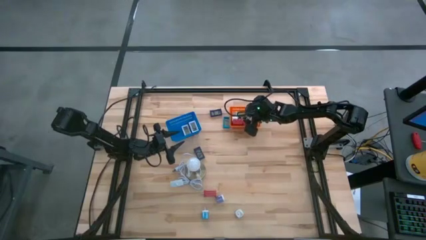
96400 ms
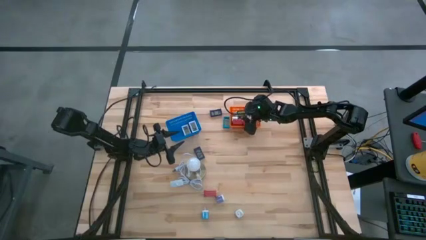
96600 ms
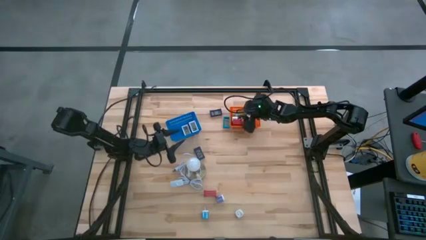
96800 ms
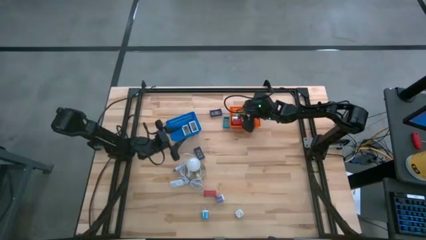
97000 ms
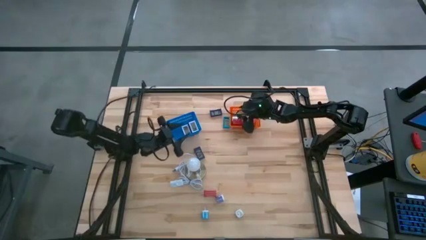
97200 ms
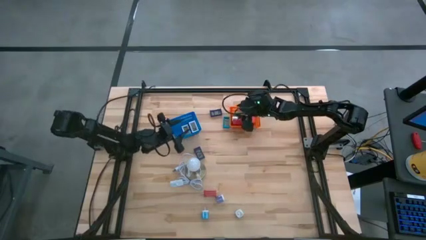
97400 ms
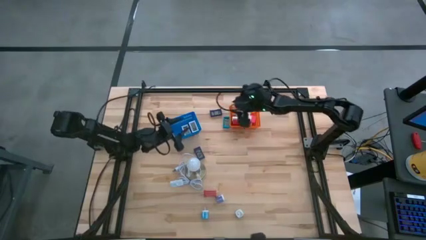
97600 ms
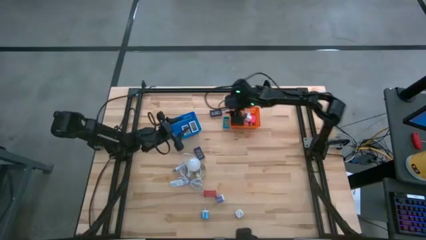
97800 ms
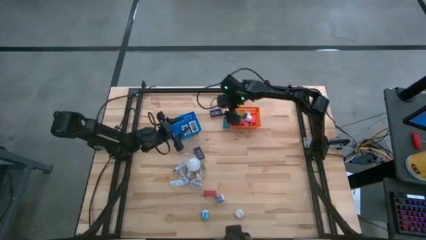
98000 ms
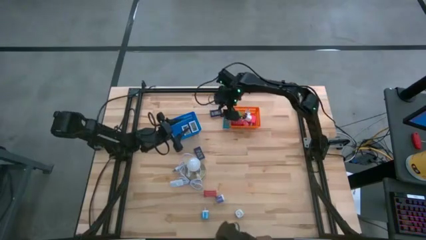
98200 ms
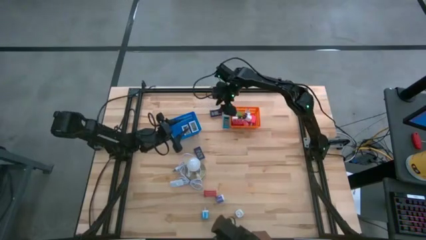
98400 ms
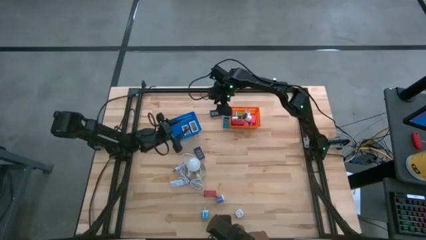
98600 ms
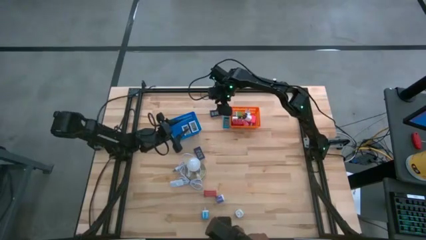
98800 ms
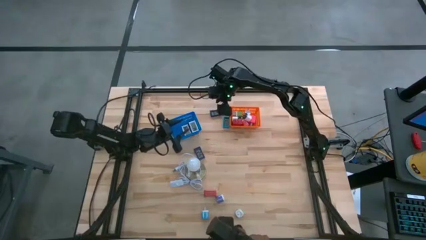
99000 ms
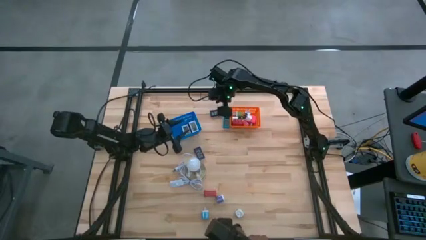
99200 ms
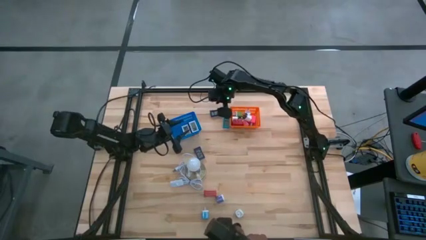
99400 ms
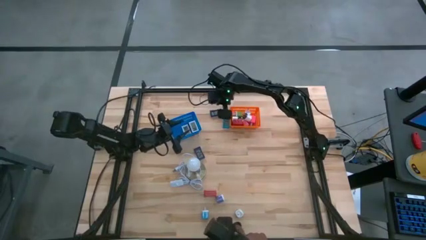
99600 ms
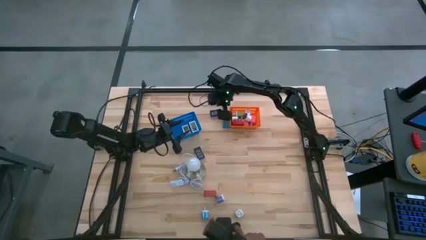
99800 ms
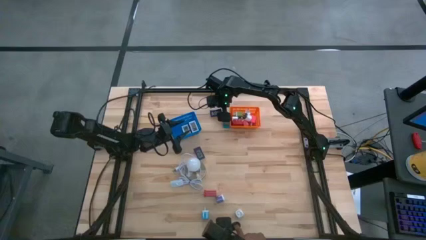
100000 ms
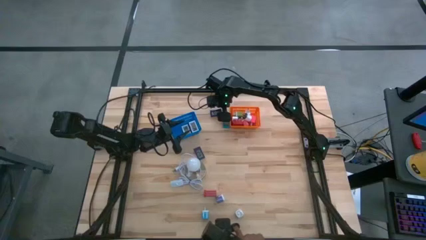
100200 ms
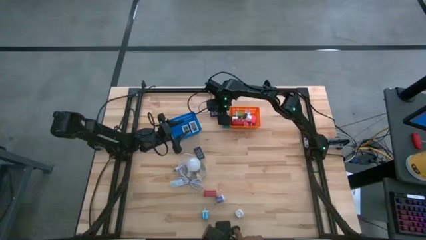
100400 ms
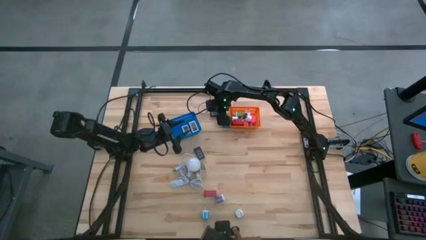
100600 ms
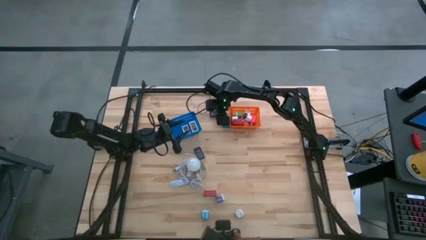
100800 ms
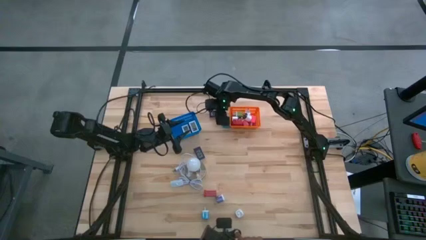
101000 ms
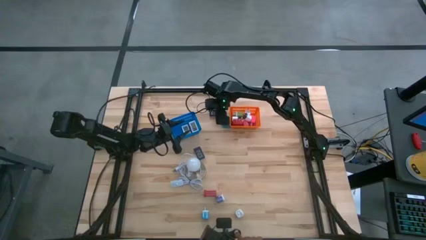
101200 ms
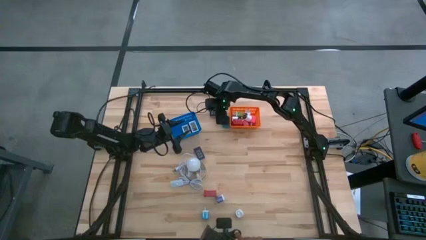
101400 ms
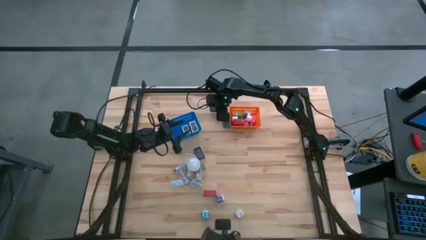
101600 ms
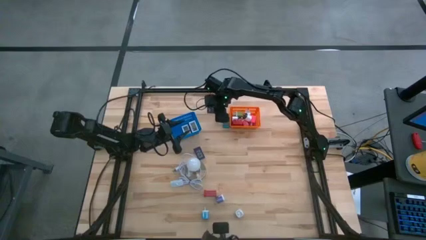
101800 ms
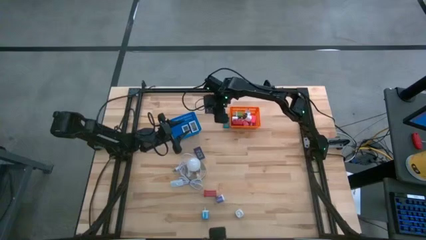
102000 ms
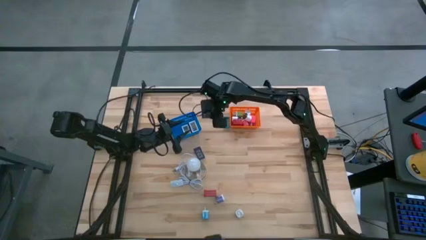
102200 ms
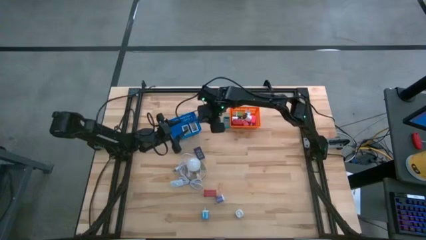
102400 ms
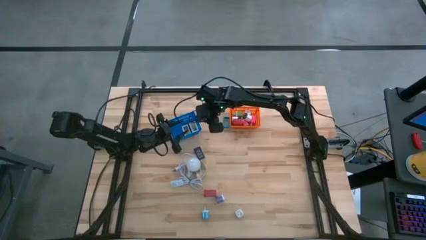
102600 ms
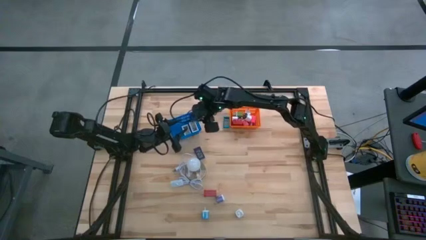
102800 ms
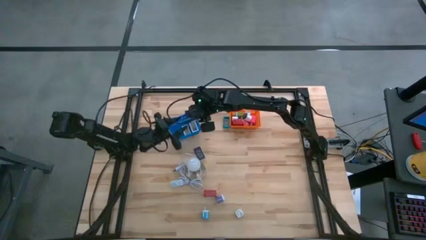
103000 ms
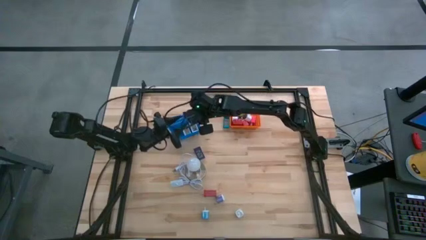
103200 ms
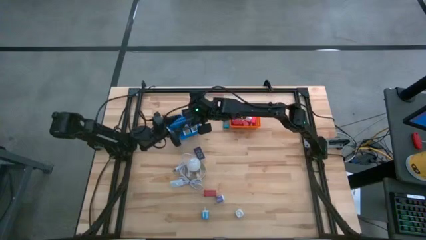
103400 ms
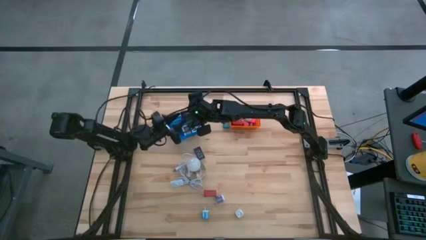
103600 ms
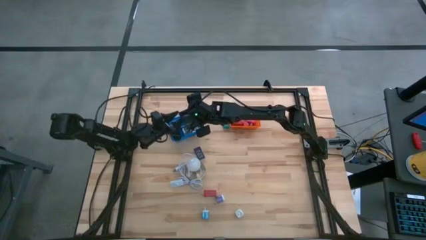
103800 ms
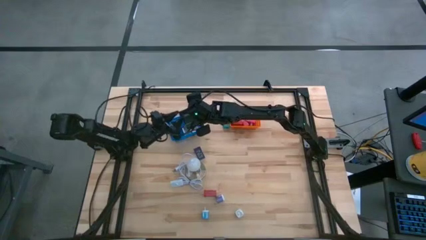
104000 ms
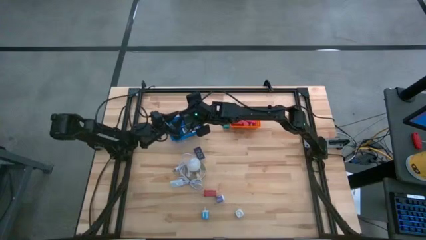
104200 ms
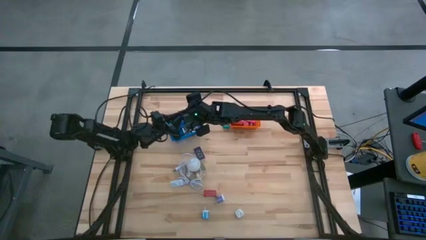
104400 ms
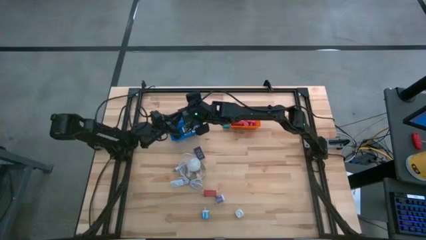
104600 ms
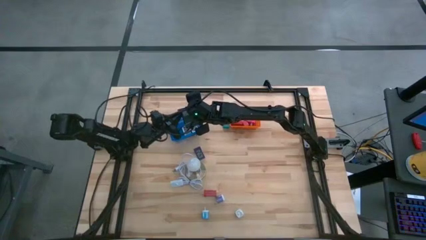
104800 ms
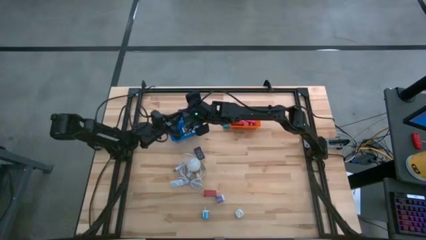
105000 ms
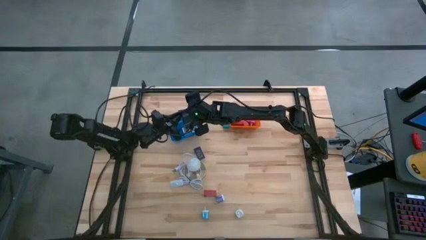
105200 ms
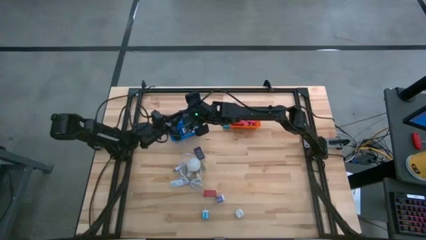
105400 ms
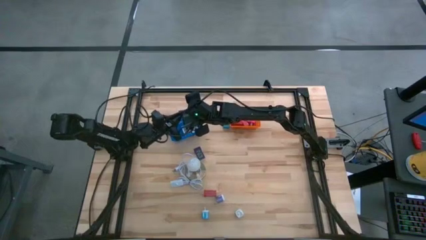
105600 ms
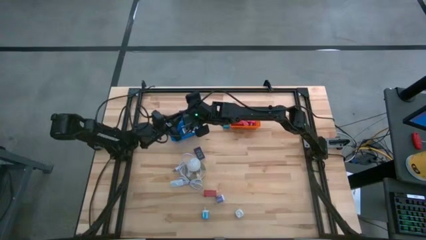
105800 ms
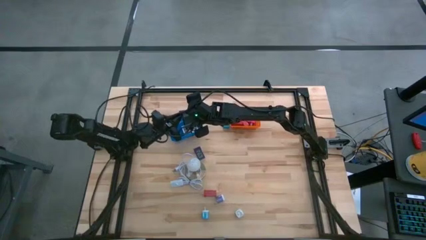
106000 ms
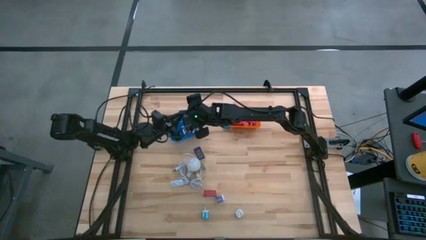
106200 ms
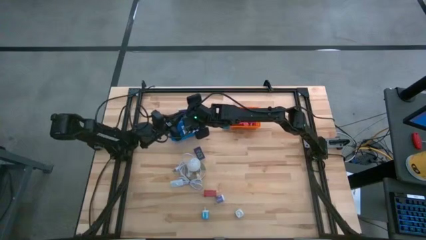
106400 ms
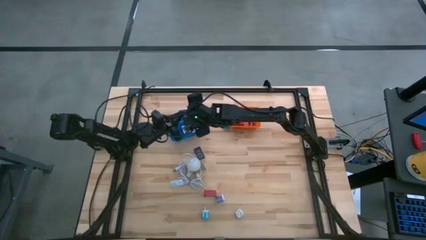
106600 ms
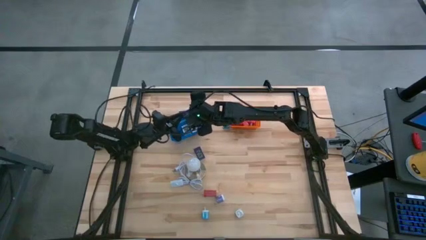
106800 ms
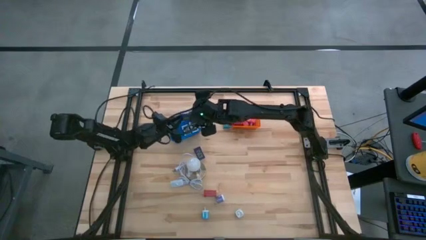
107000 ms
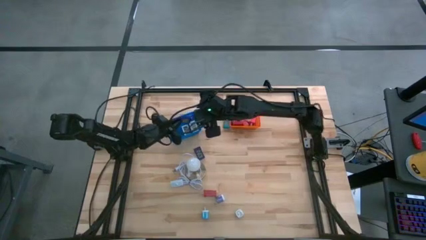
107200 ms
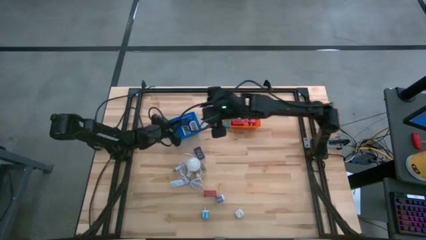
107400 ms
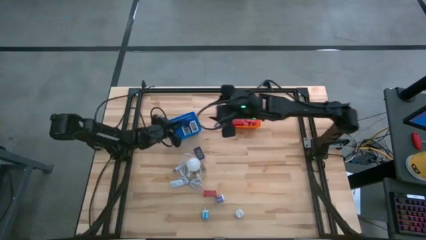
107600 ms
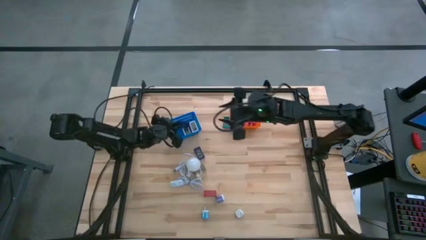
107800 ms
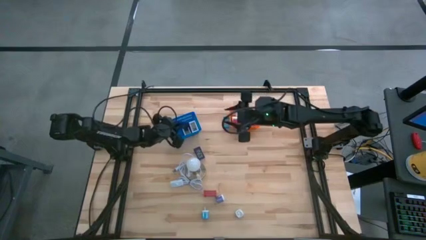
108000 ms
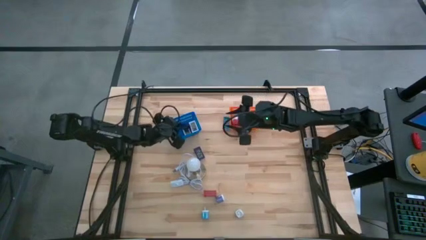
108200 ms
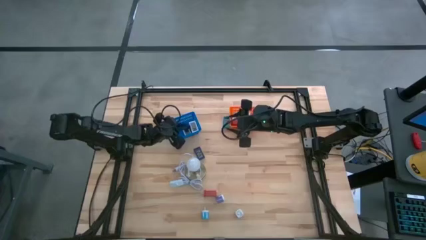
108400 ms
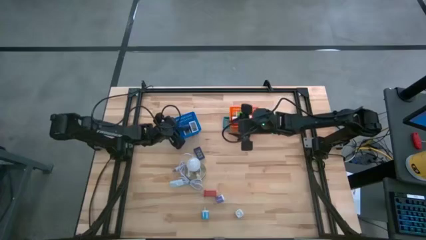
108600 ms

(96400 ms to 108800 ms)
Task: Pick & Place Office items
Put the top blue timer into the blue bin

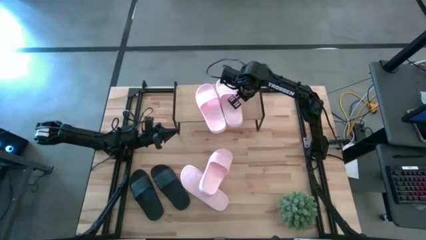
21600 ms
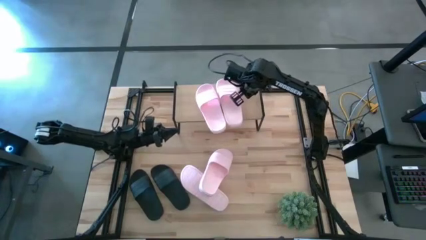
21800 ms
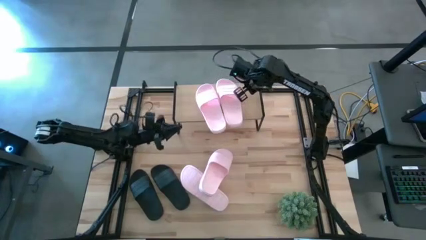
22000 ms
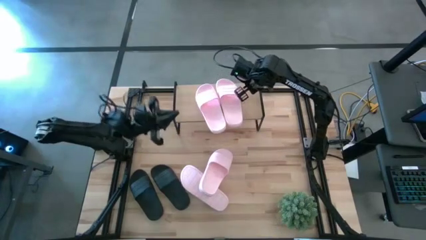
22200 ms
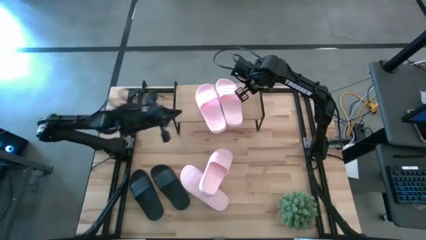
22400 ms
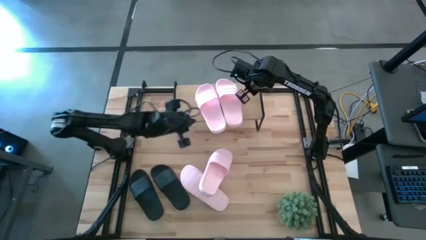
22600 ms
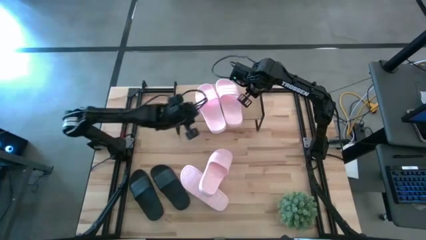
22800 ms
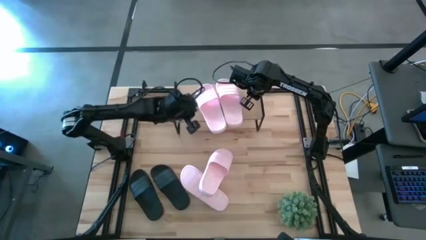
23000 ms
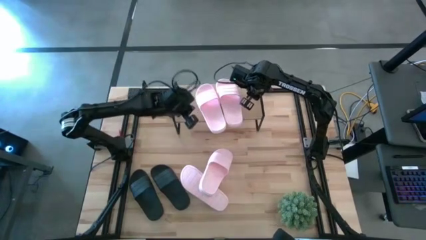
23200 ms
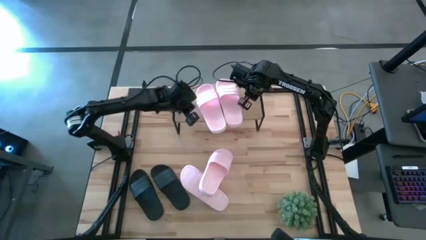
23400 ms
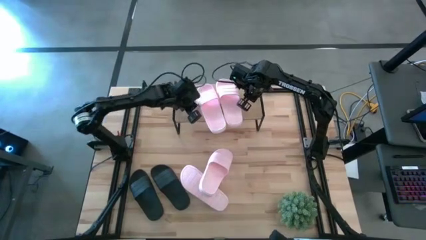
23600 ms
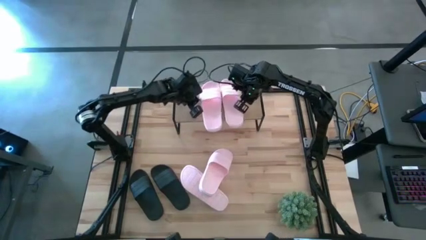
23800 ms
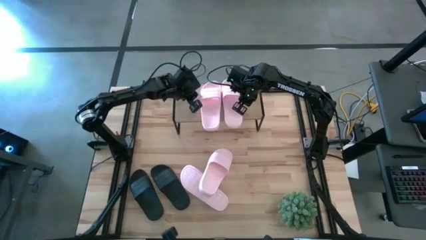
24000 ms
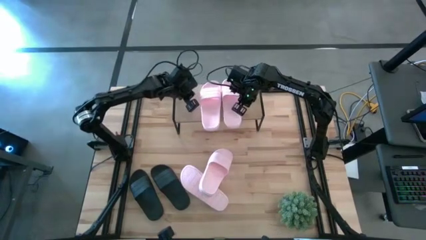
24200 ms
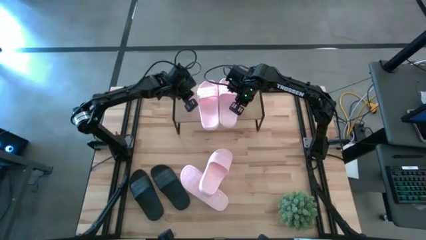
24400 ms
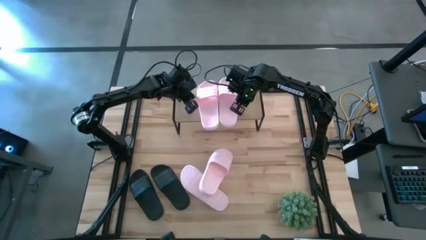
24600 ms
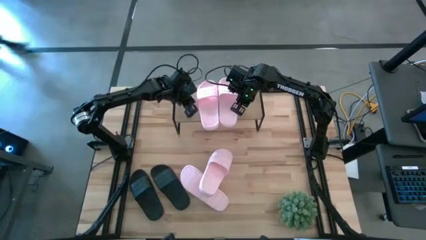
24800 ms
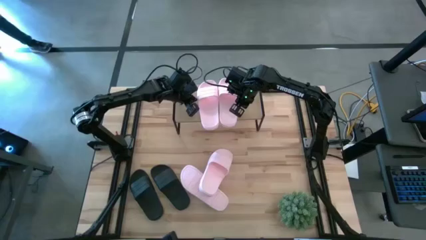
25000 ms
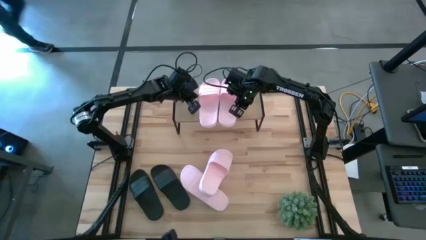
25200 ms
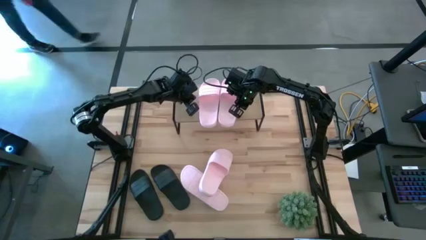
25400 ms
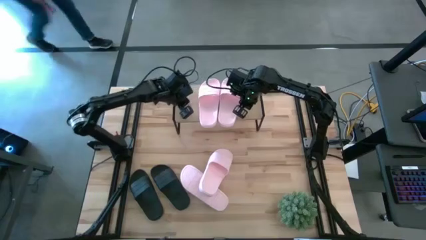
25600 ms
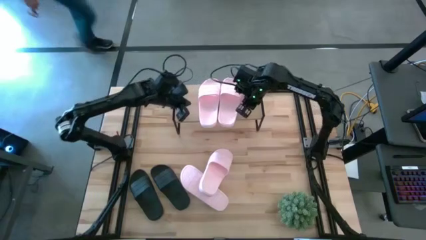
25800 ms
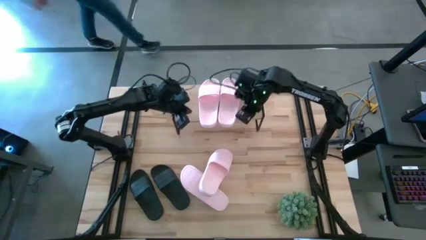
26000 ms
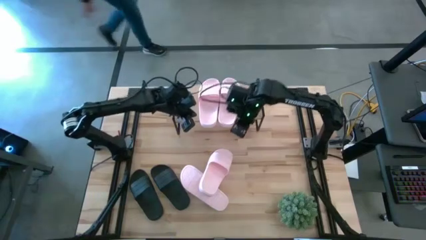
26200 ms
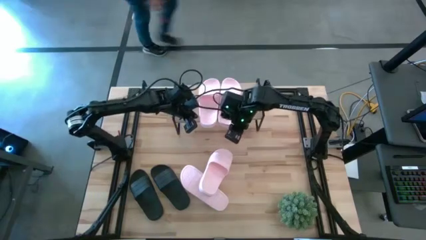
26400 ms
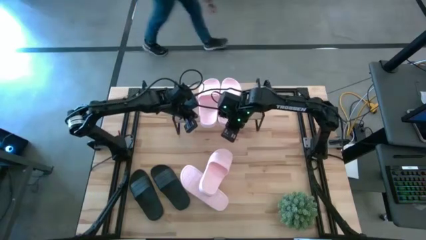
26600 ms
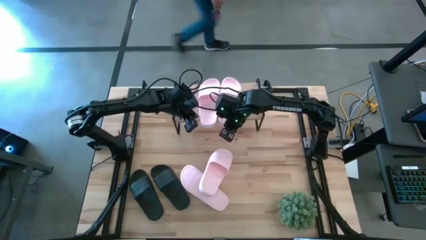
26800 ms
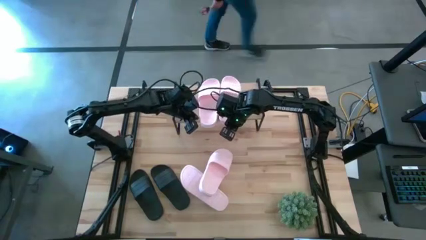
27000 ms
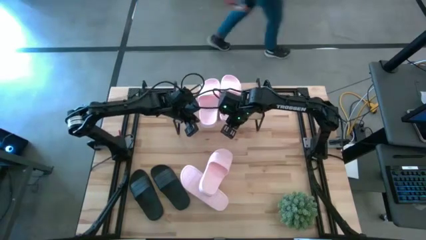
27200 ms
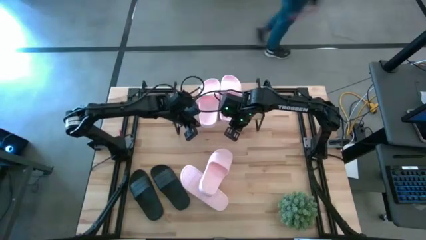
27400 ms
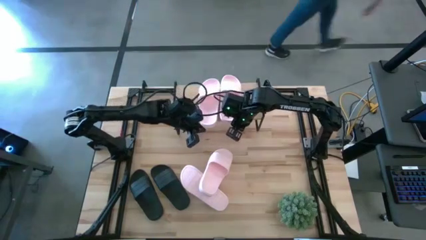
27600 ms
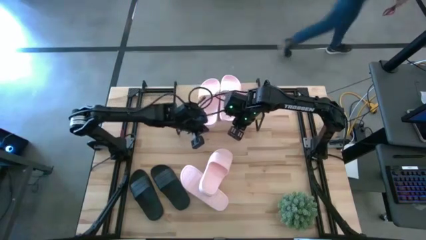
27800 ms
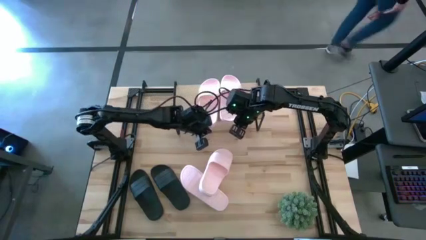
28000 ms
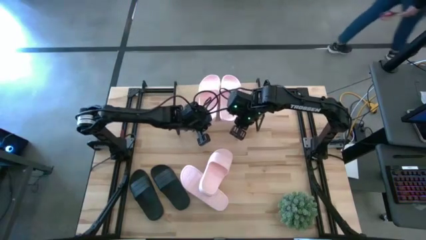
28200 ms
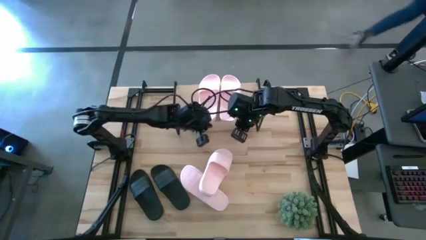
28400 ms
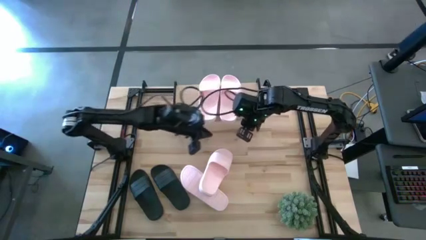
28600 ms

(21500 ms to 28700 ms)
Task: Pick and place slides into the shelf
Adjust the pink slides on the shelf
